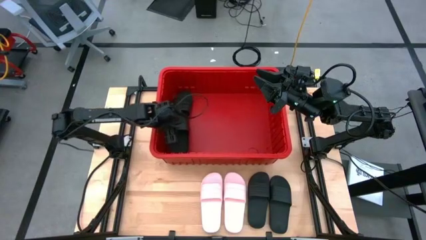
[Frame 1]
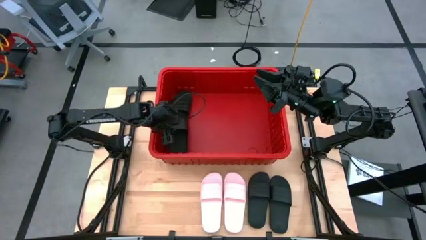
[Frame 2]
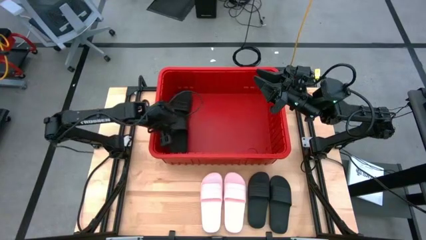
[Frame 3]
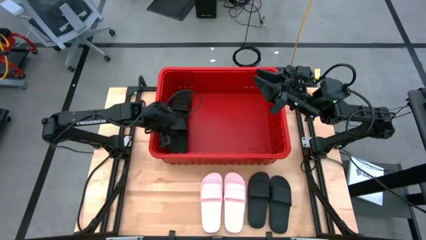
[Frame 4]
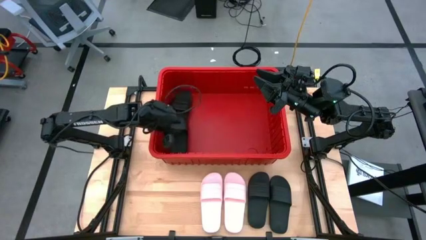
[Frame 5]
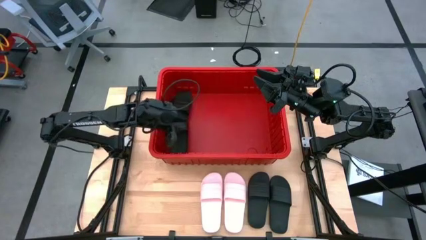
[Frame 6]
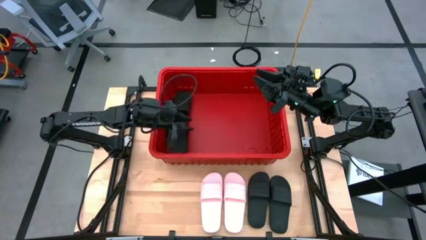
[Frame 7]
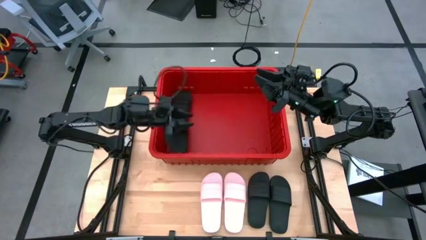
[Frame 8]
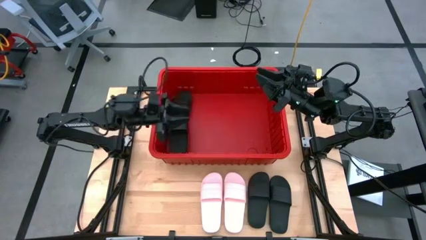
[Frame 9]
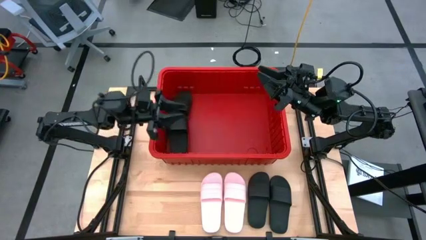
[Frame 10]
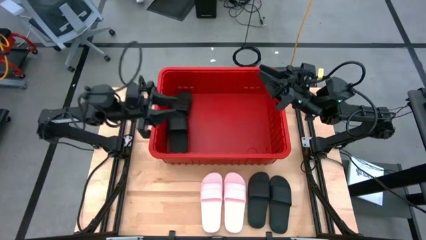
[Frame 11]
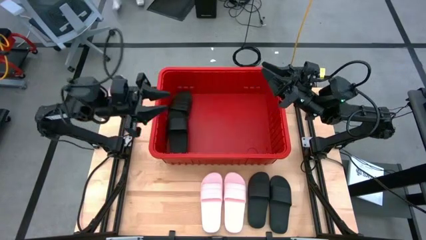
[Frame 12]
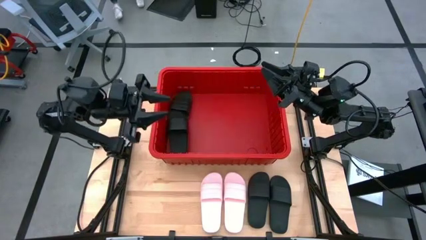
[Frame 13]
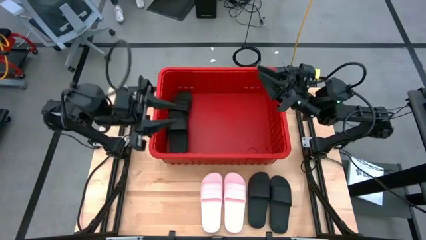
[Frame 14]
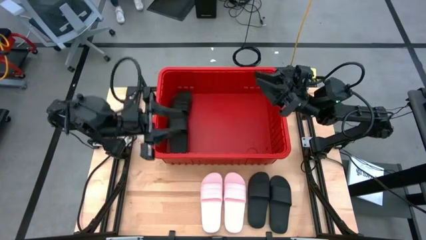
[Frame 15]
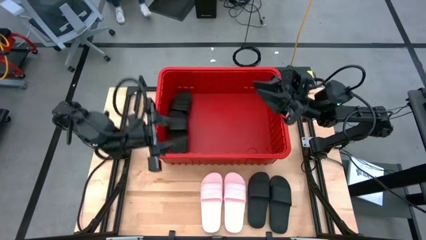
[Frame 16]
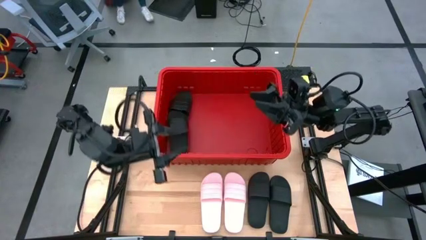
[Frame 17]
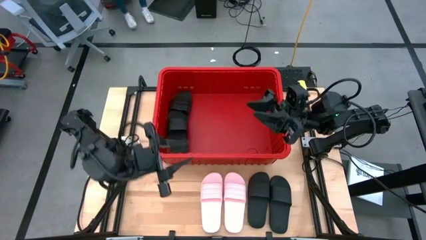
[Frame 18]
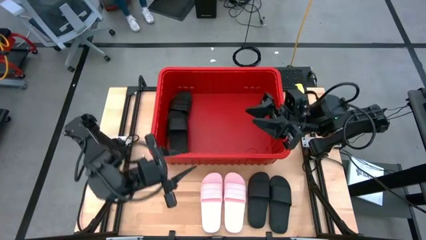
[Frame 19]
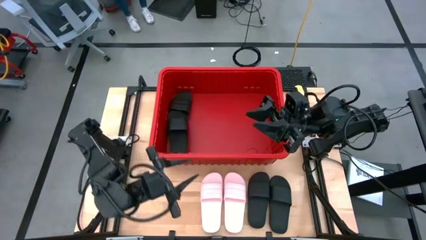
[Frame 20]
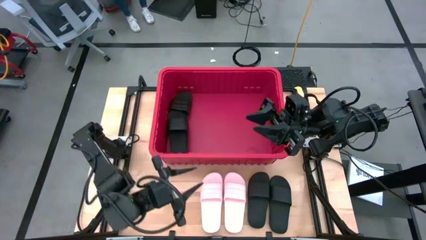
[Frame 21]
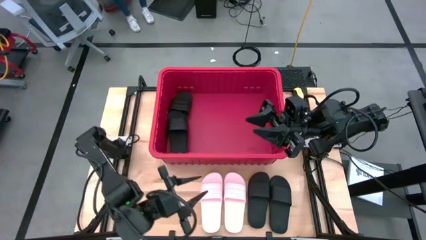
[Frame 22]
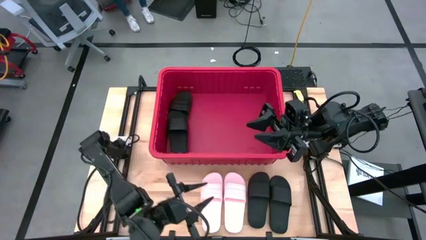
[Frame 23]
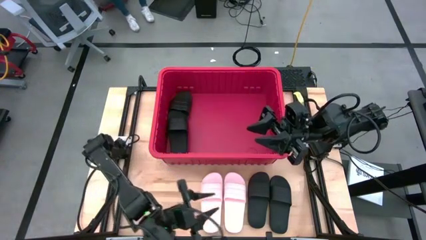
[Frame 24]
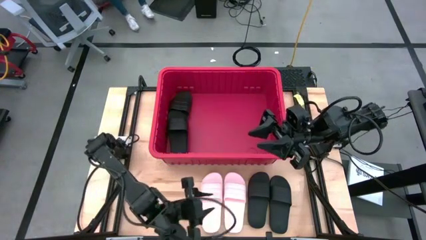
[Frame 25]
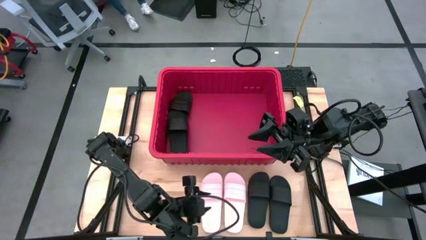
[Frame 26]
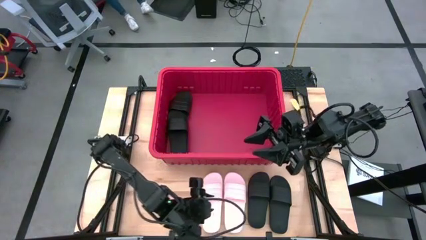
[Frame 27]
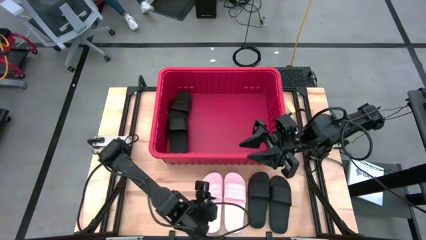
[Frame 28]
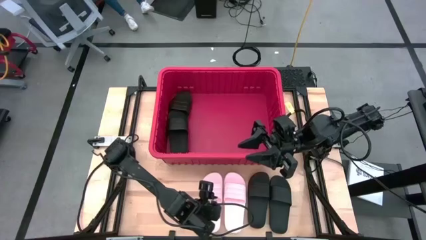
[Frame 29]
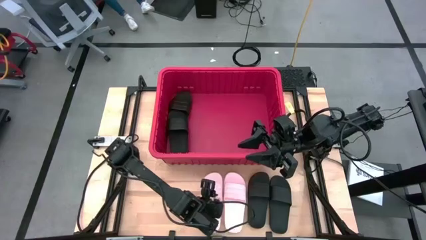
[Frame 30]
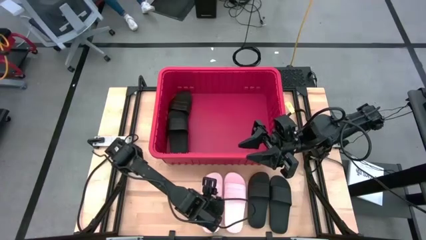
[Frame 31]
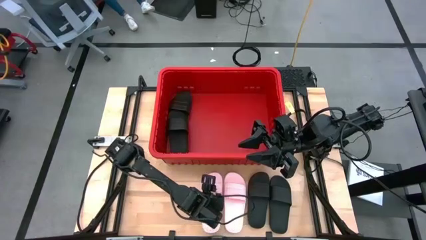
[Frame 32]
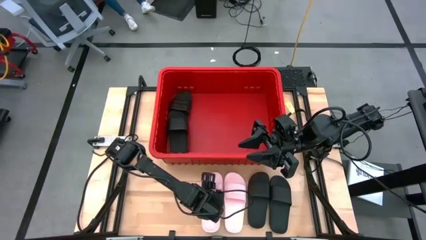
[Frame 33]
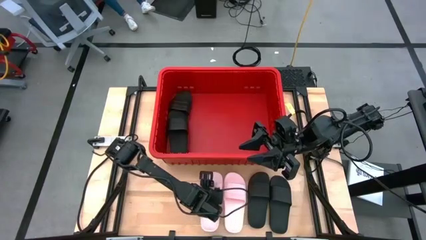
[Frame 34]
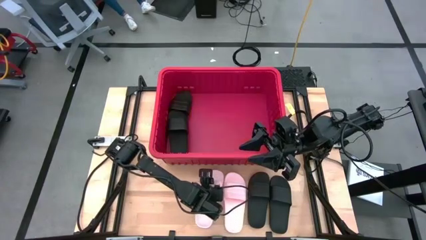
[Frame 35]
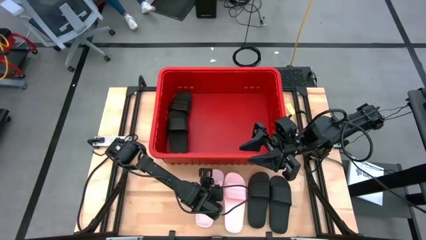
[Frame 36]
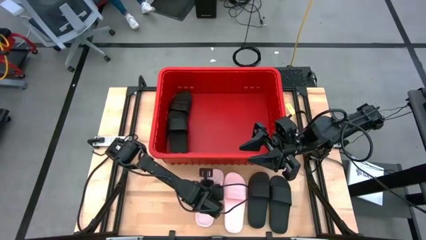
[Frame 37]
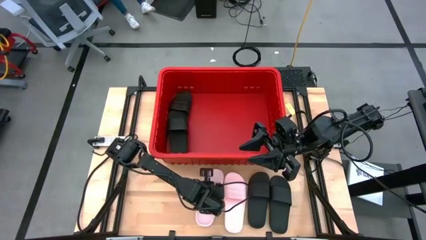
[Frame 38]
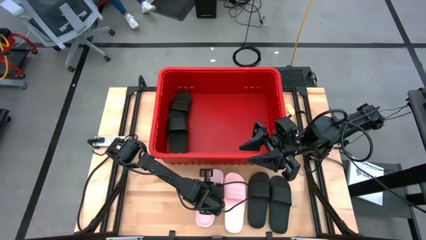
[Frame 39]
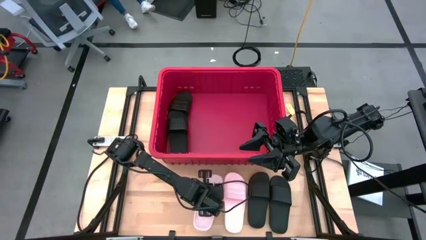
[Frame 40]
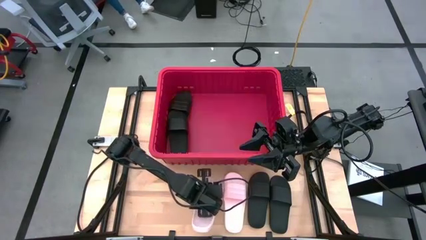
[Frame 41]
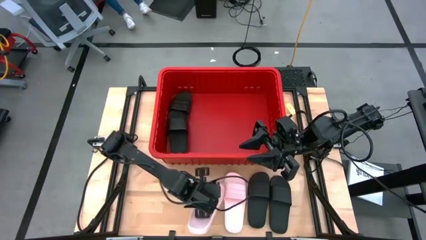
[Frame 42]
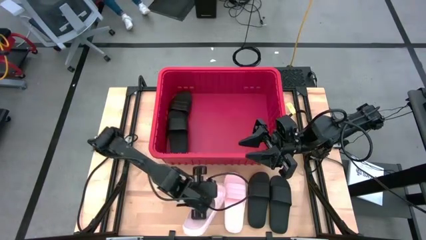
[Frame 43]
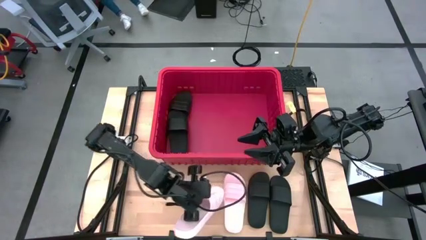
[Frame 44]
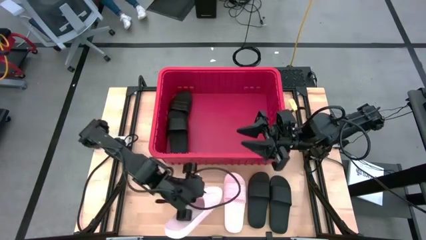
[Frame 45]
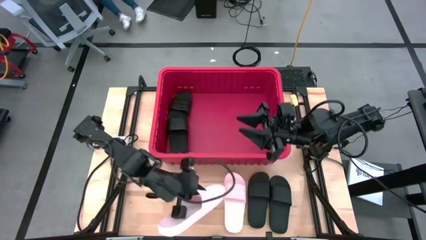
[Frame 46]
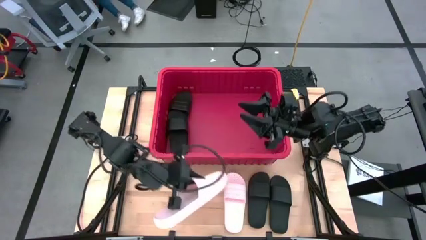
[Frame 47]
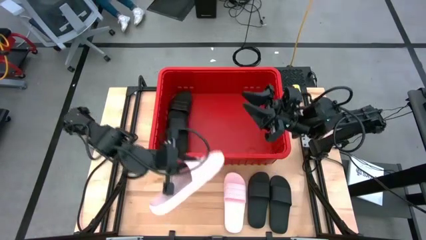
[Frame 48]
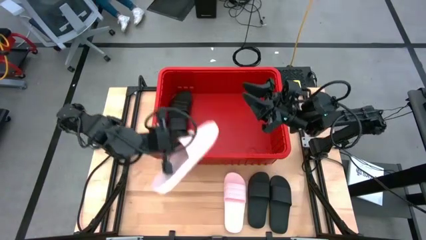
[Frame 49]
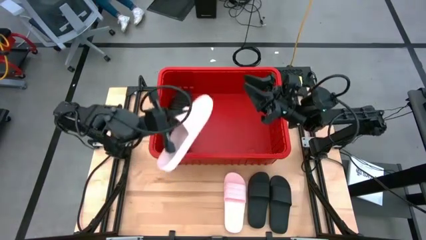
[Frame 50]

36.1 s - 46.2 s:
Task: Pick and place slides into bin
Put the left pink slide into the bin
